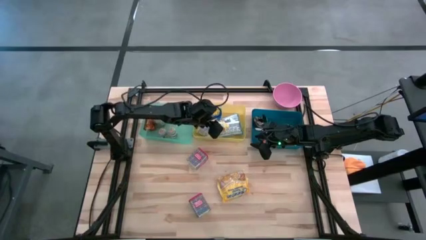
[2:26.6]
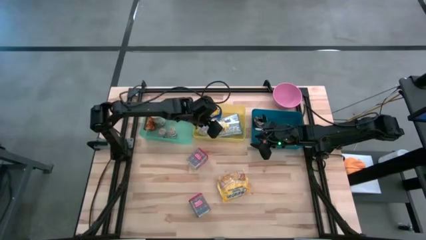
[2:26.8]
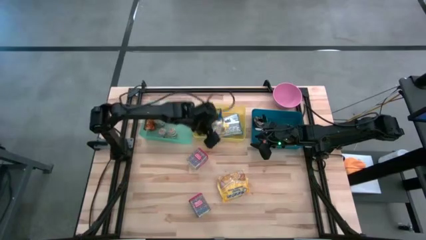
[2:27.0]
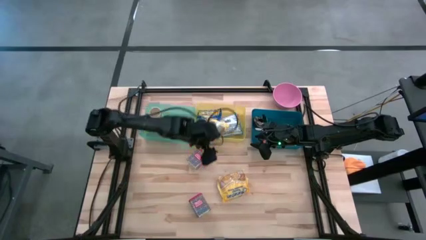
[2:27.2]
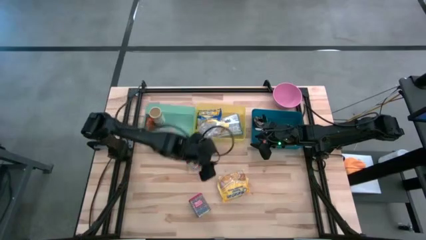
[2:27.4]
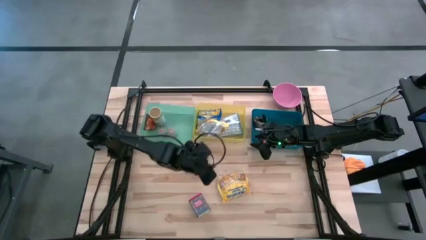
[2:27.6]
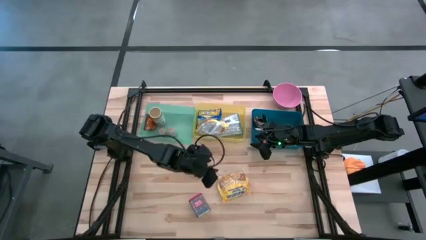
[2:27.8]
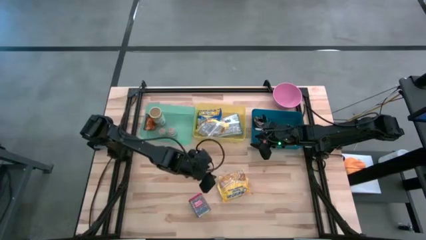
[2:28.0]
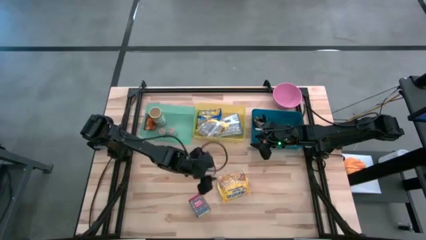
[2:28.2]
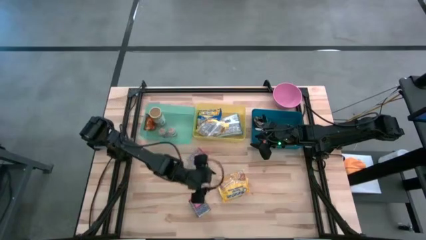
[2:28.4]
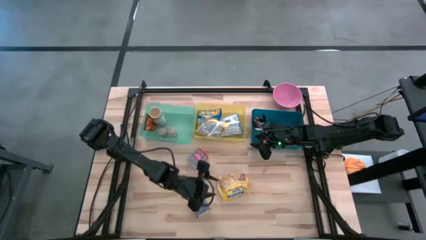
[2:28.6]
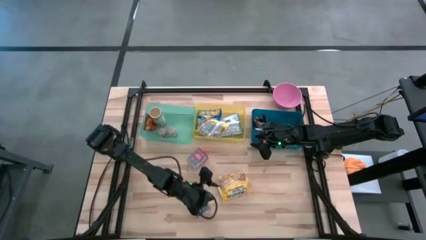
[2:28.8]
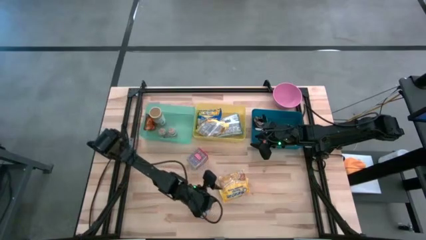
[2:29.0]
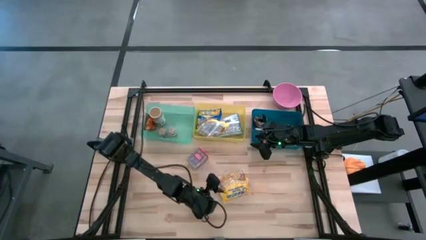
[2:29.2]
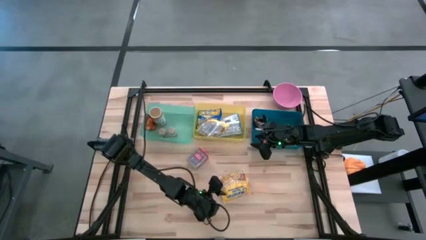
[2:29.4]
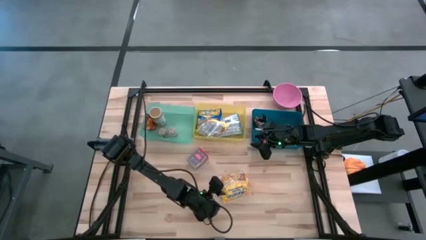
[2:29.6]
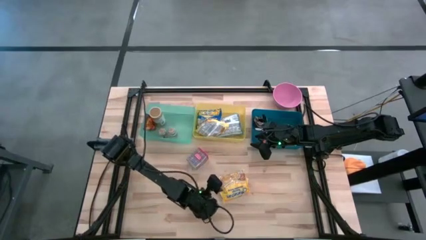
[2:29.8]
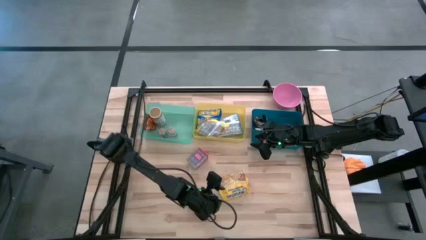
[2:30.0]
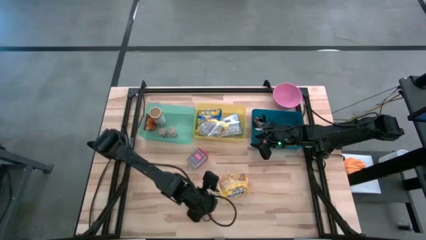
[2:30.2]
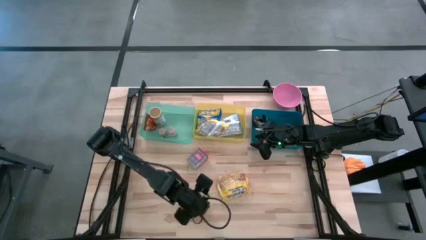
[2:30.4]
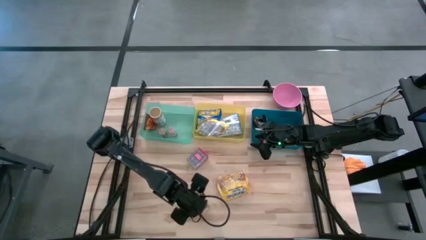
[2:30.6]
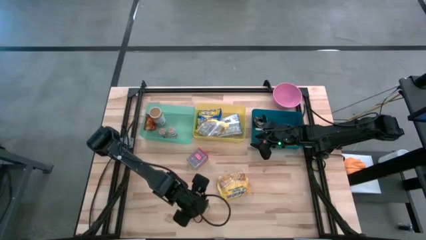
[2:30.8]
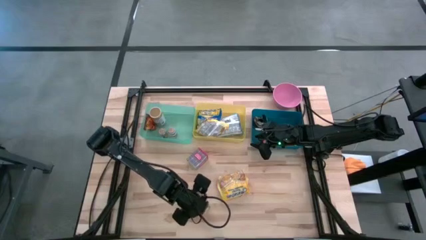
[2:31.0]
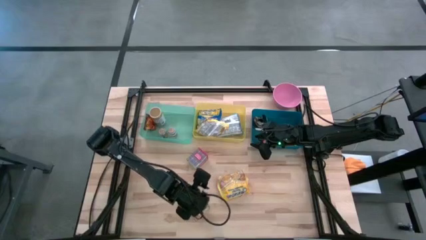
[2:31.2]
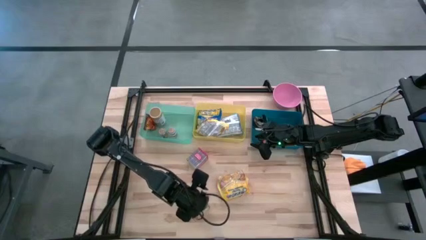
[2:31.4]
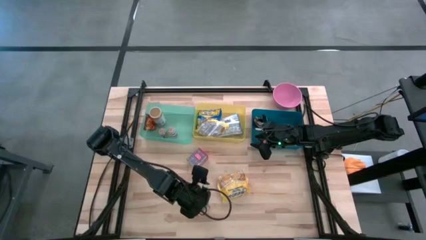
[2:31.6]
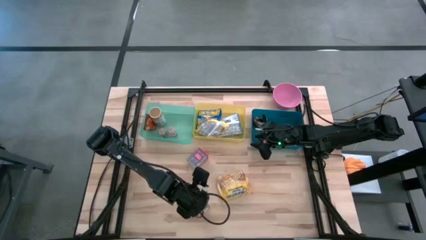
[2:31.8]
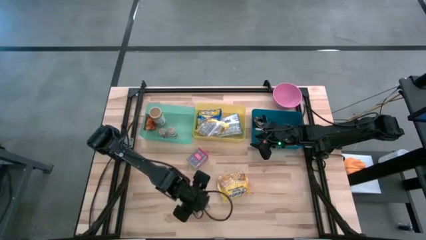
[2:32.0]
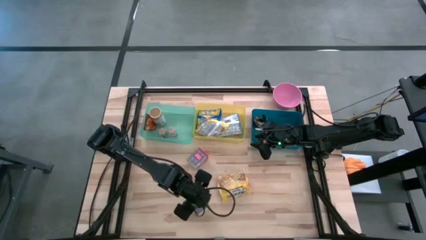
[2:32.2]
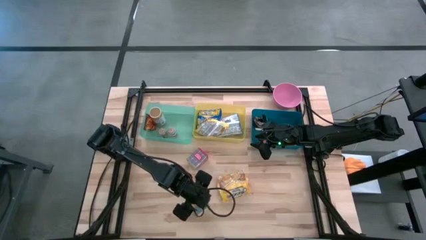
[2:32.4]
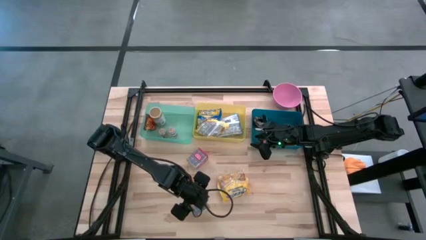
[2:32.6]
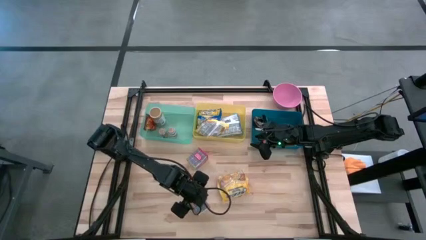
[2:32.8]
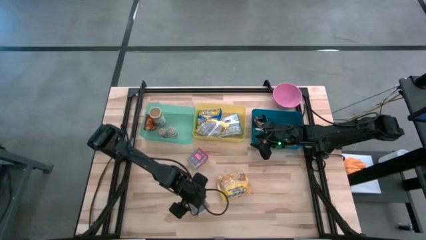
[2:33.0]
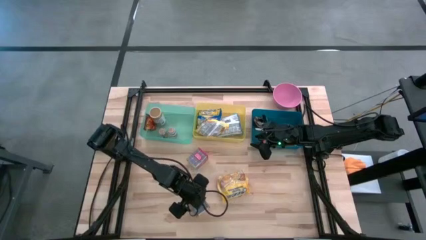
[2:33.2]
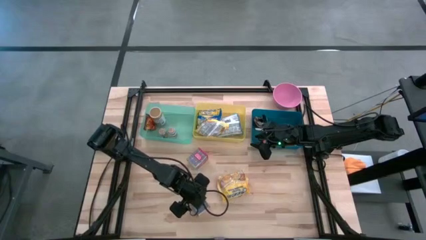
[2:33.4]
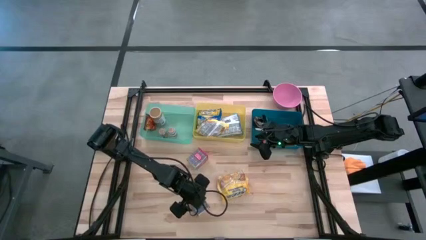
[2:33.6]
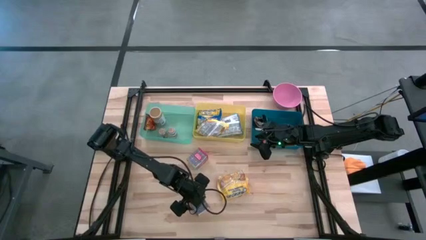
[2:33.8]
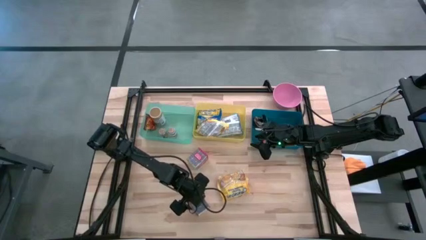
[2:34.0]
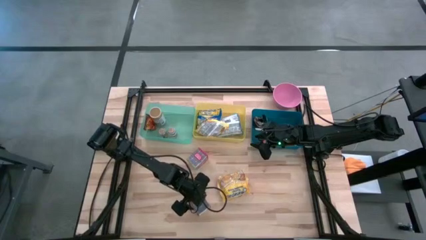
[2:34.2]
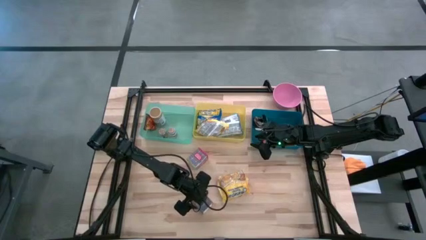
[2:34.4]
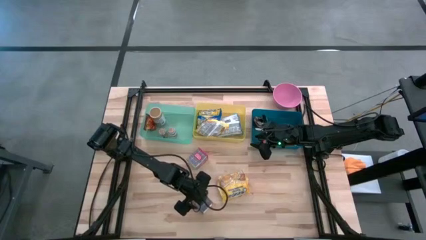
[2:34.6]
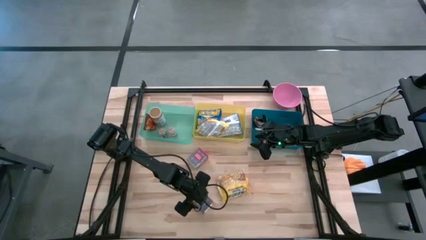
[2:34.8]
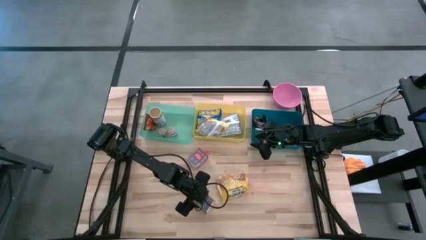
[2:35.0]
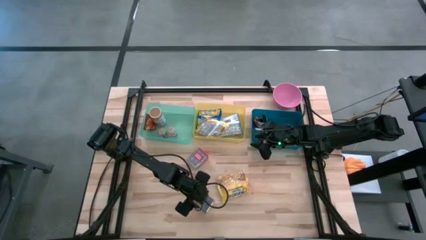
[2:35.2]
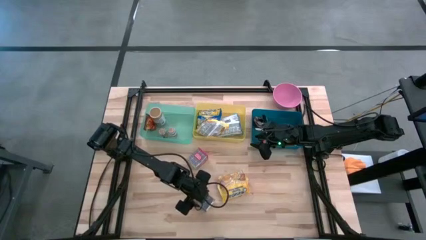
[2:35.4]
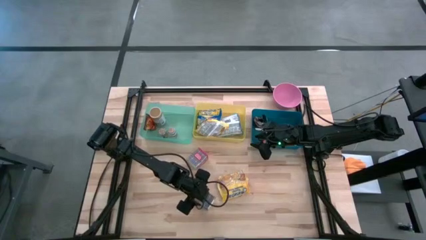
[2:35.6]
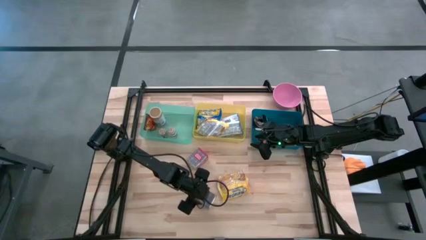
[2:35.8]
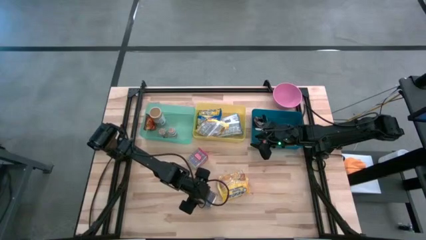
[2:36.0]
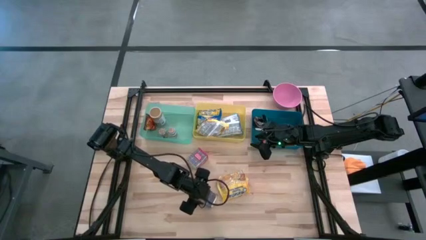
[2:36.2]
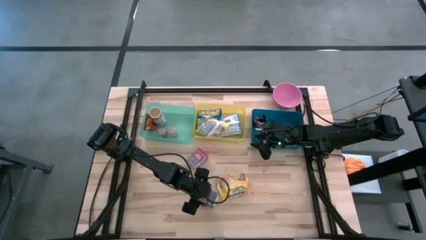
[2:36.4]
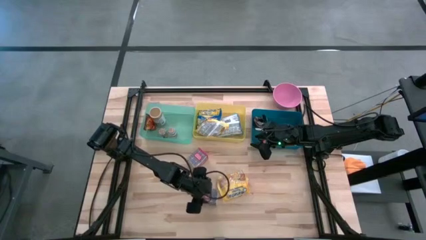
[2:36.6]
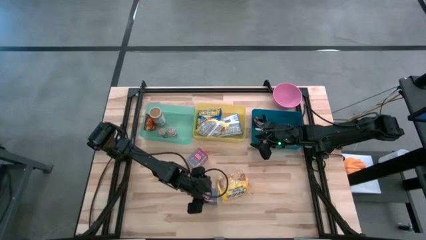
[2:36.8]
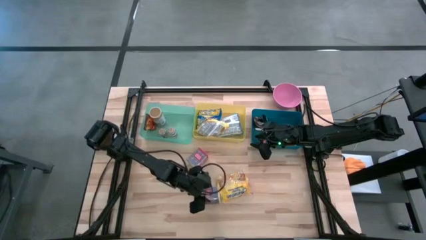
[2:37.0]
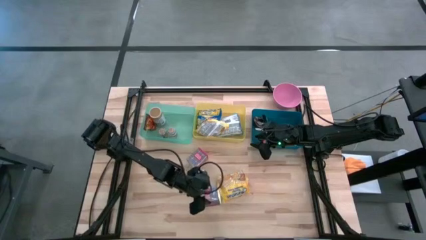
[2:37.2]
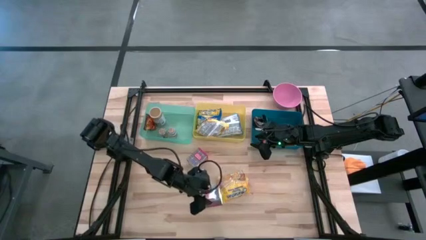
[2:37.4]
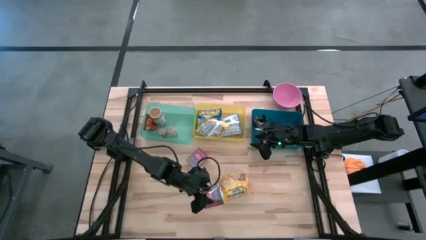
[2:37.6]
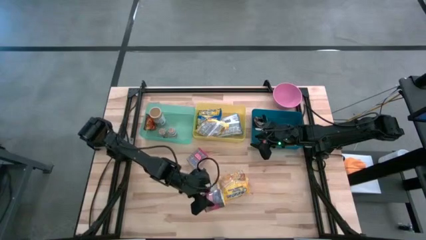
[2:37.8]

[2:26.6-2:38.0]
Put the red seasoning can into the green bin
